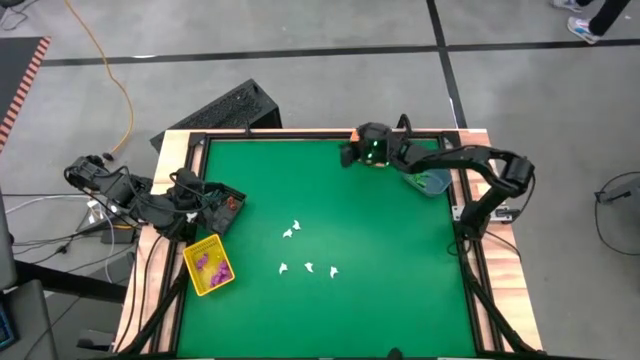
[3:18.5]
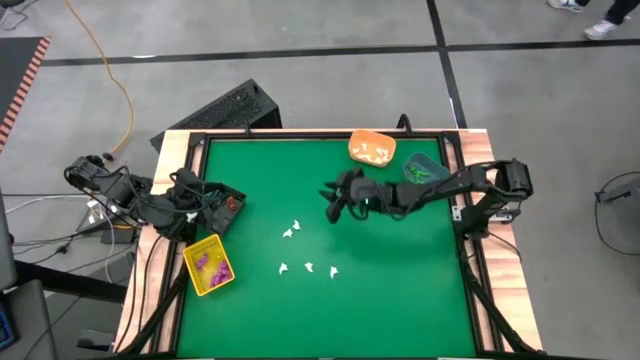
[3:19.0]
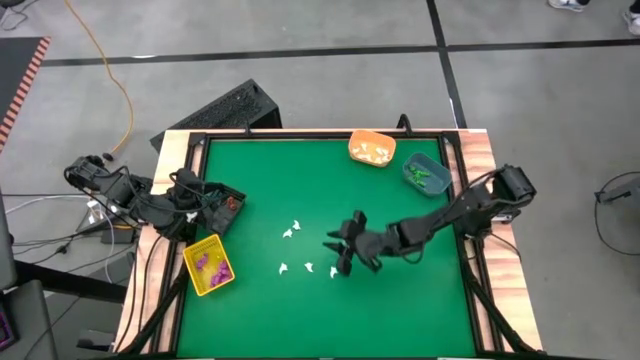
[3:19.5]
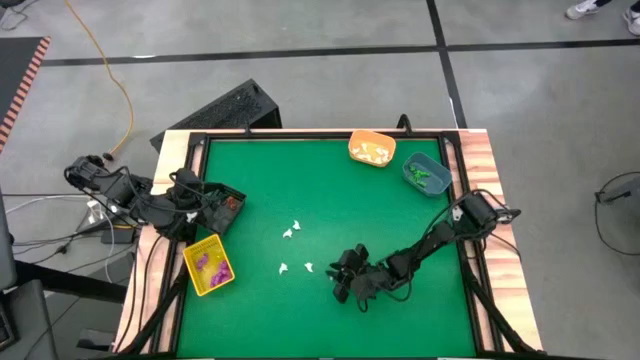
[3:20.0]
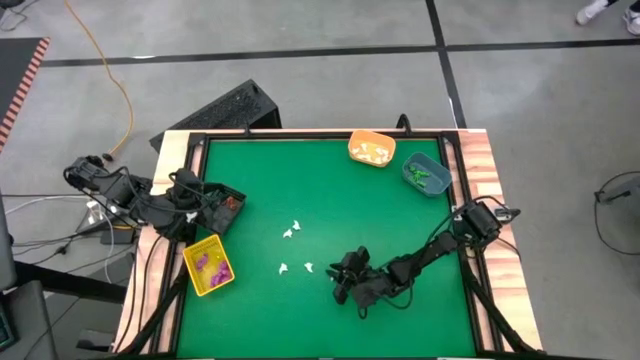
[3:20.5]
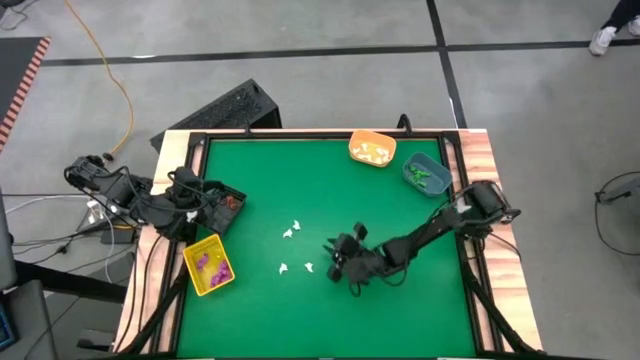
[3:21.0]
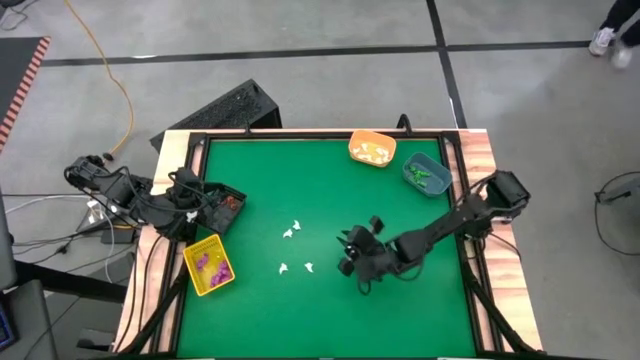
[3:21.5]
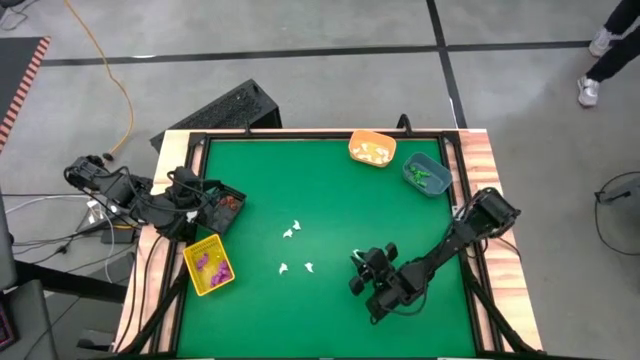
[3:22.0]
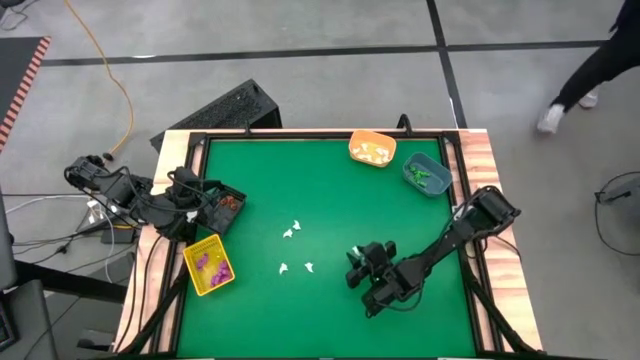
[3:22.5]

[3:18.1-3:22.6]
Task: Sort Halloween decoration
Put the white ghost toy into the light orange bin

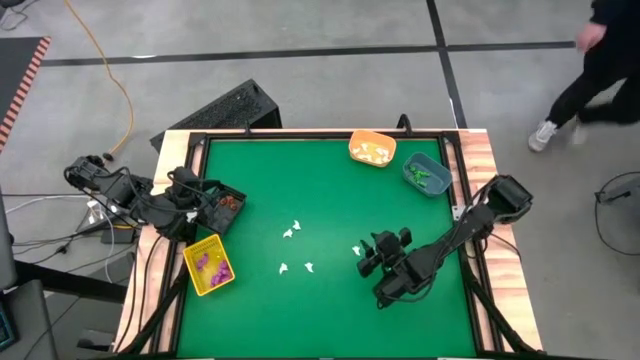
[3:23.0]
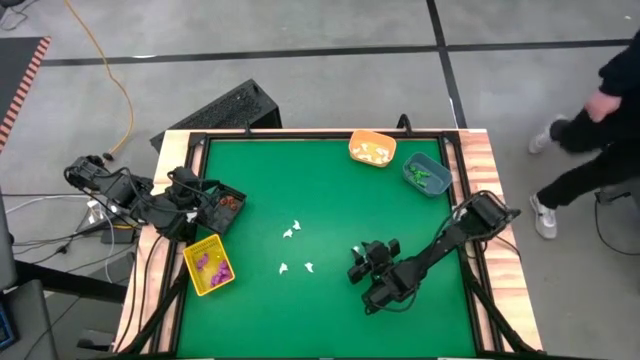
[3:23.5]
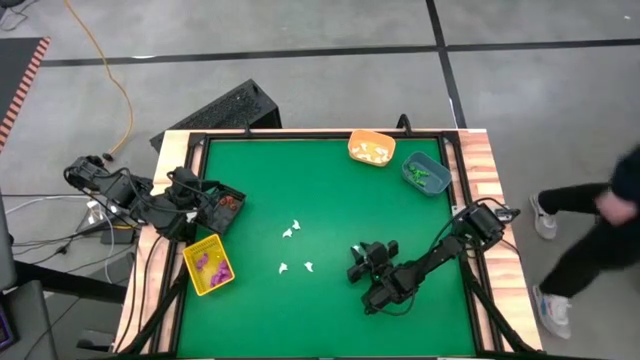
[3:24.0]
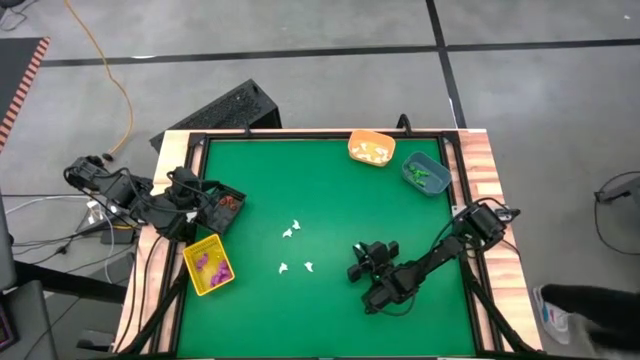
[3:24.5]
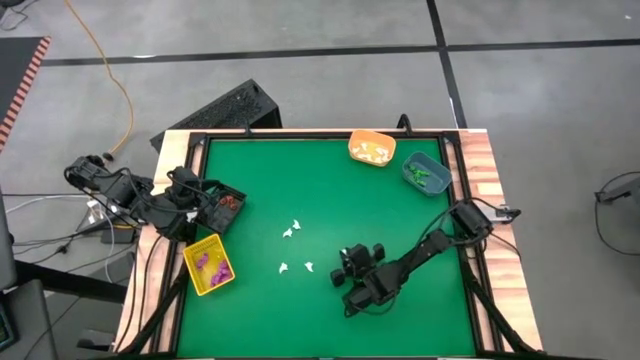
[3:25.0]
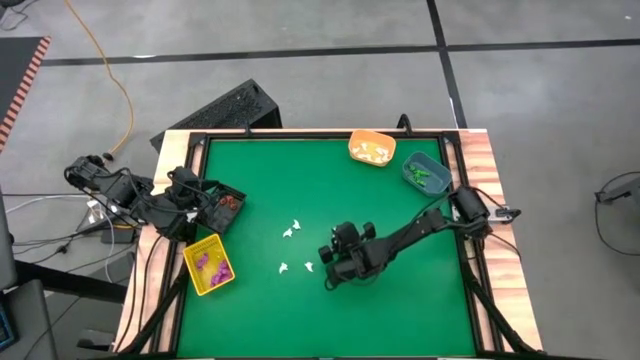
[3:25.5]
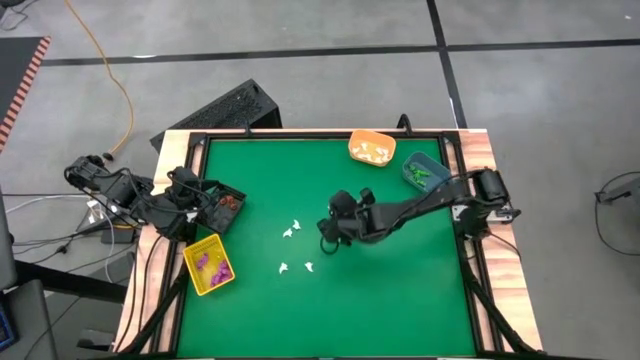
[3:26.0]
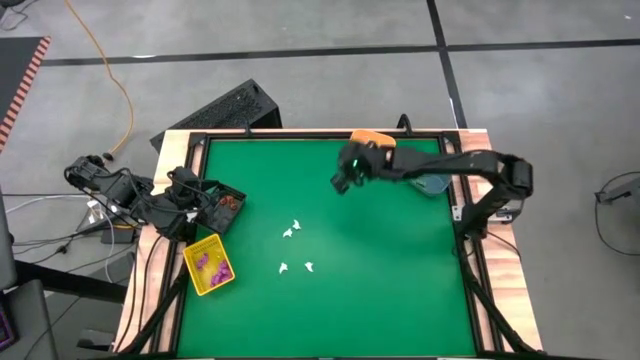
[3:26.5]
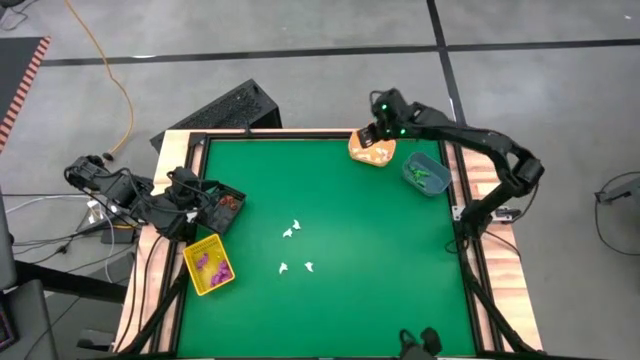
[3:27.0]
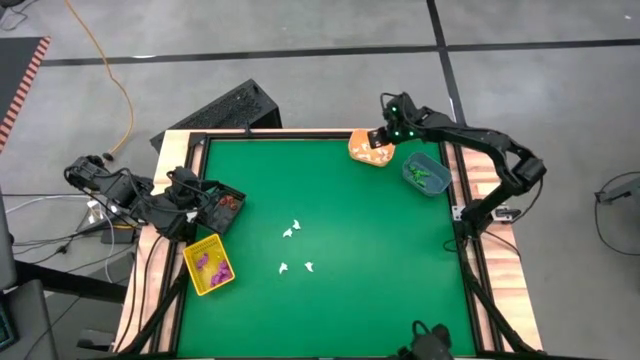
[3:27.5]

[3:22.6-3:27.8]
Put the white ghost toy into the light orange bin

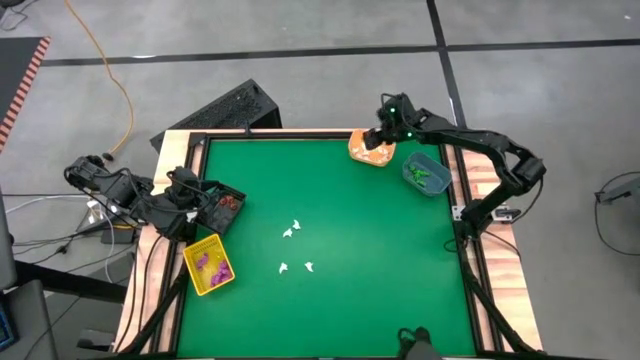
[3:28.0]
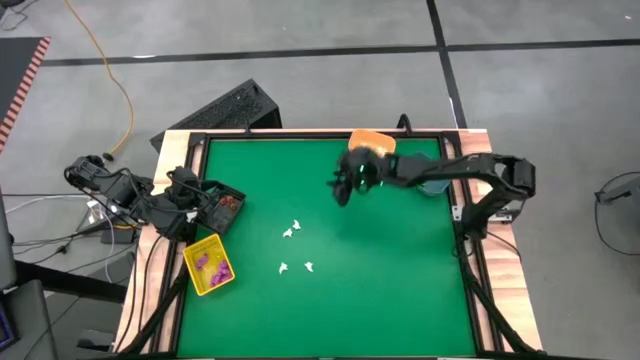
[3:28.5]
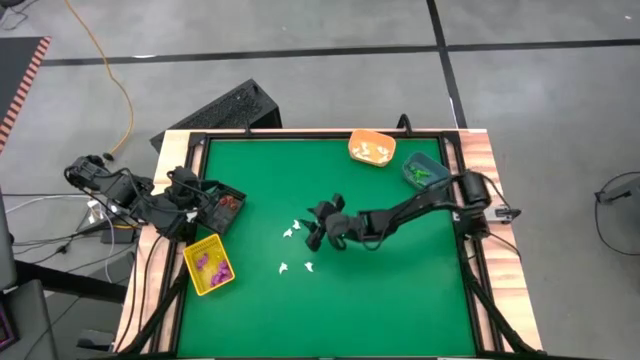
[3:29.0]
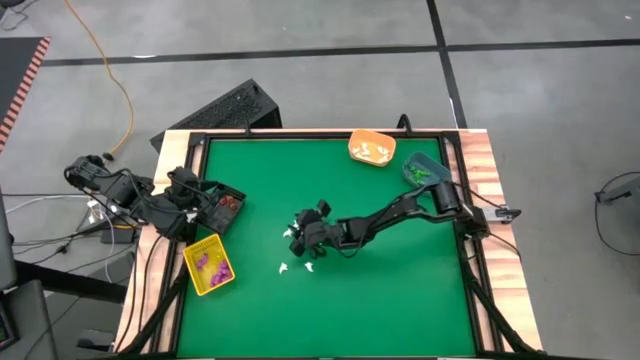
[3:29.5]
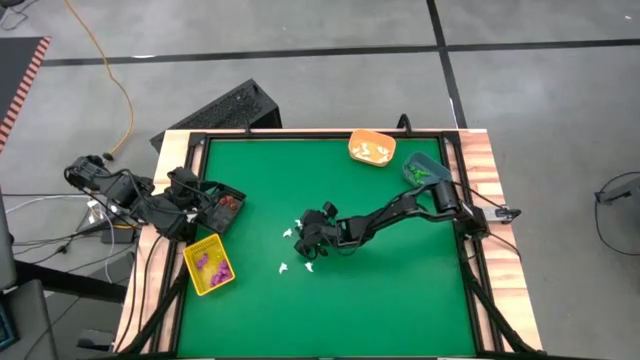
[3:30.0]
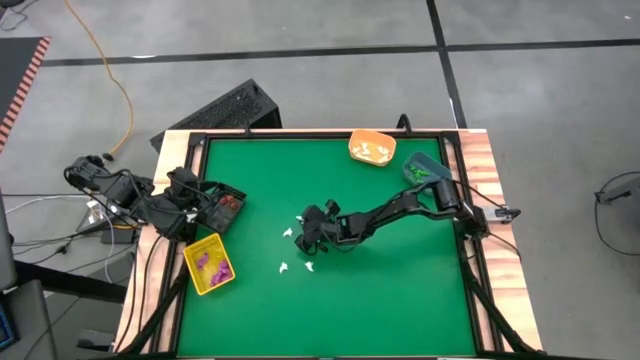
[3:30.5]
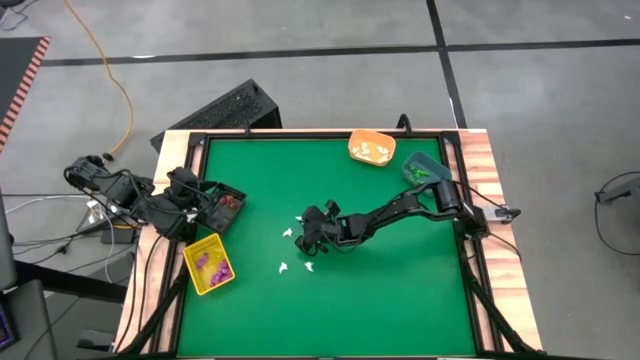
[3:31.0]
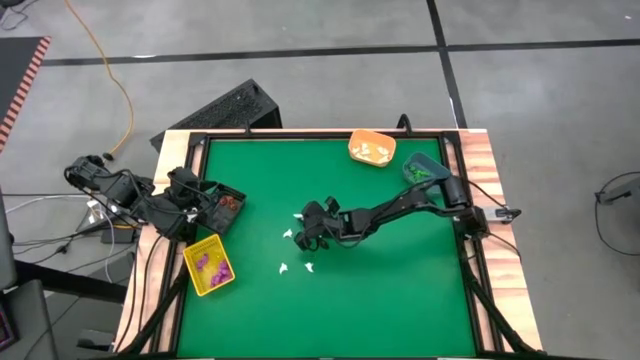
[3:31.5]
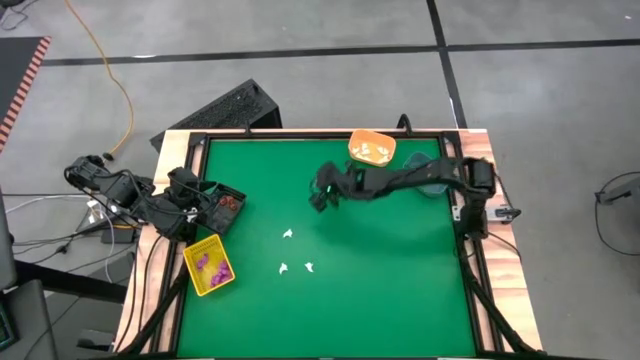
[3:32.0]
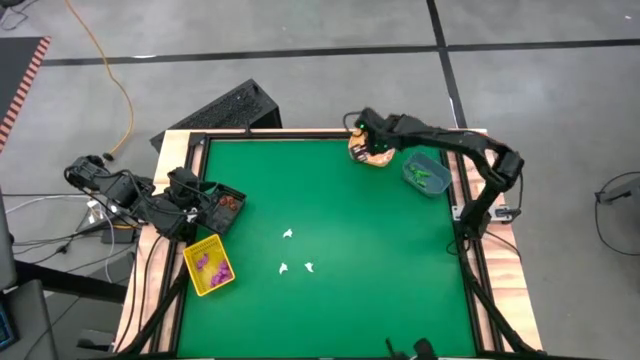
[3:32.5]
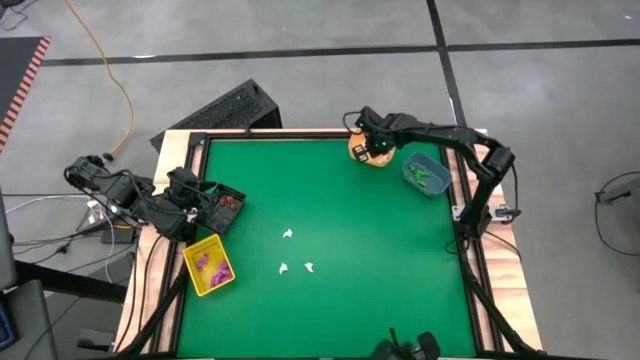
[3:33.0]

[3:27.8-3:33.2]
Put the white ghost toy into the light orange bin

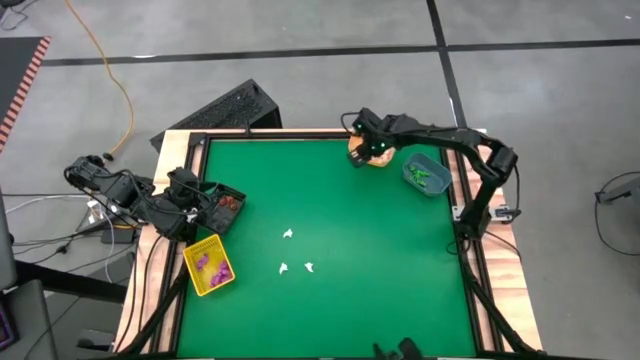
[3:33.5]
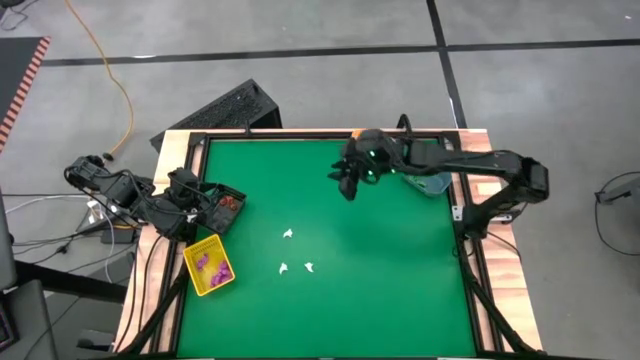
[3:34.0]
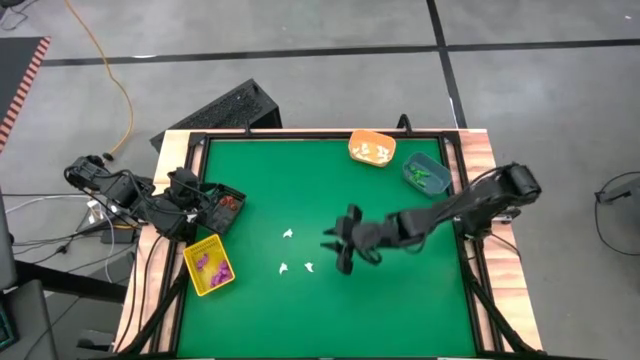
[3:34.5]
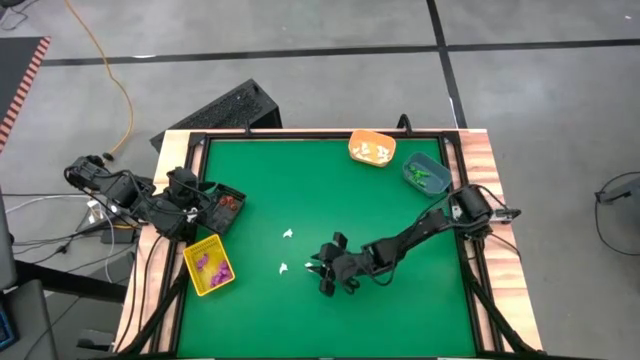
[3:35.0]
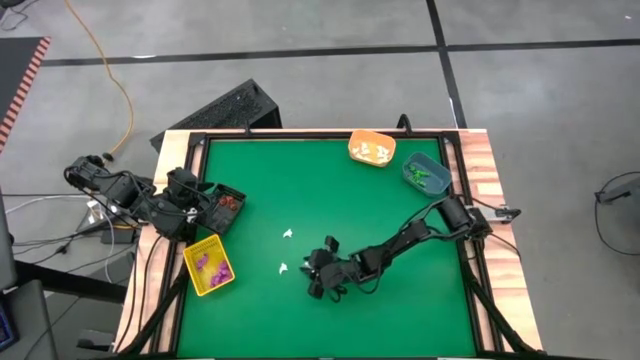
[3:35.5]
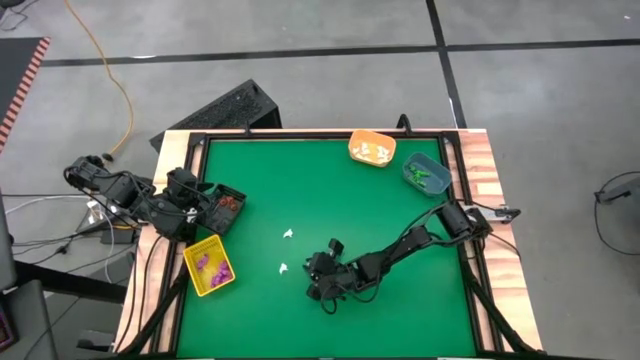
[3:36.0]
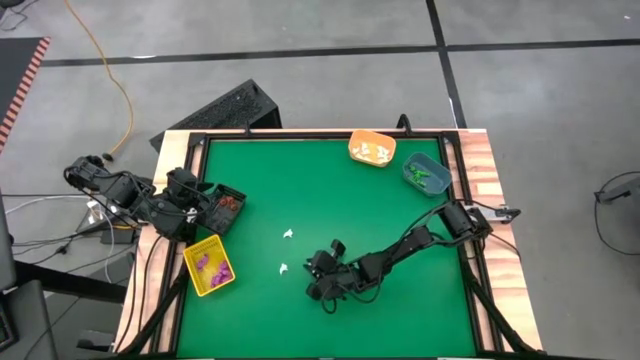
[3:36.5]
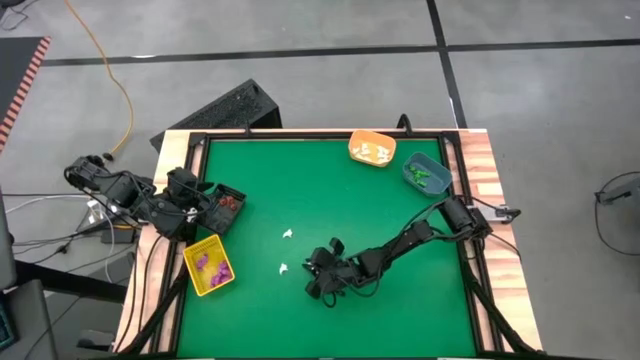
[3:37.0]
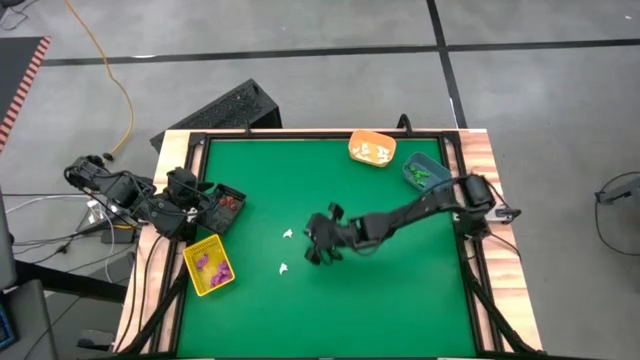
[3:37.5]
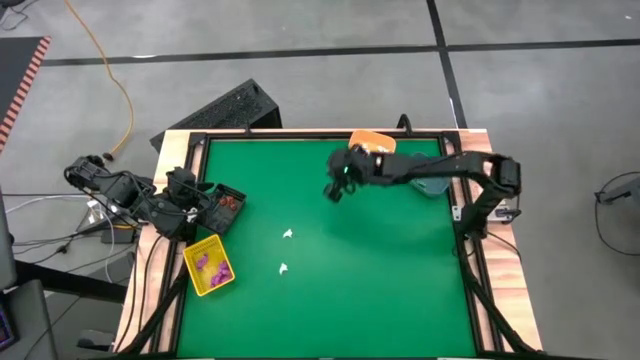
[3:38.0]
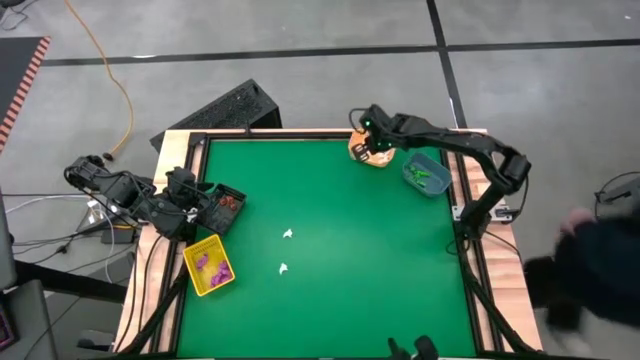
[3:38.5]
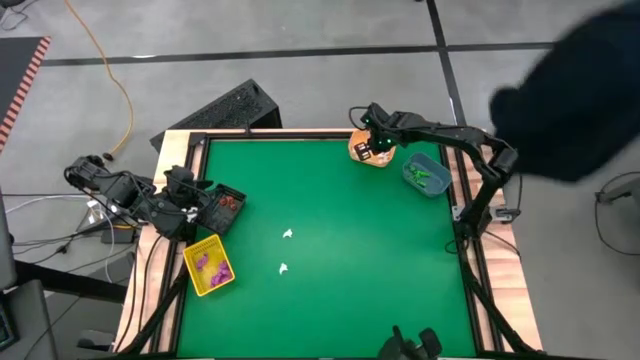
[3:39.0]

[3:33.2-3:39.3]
Put the white ghost toy into the light orange bin
